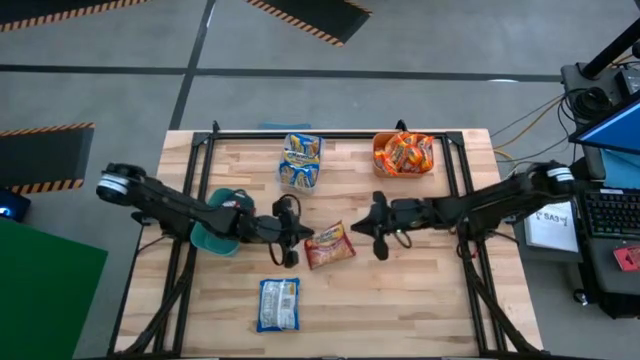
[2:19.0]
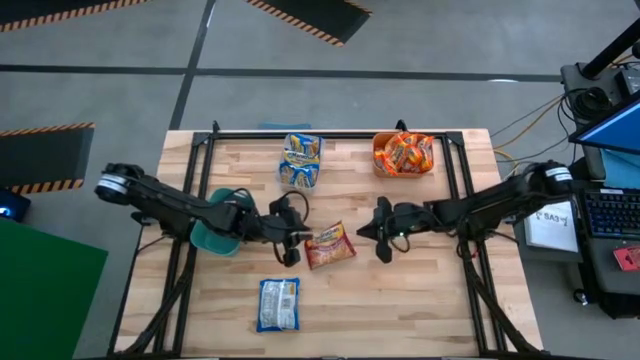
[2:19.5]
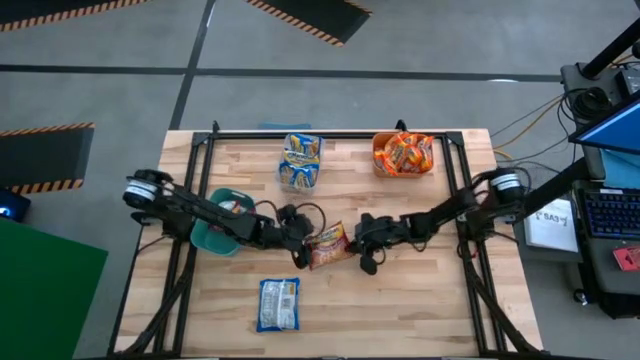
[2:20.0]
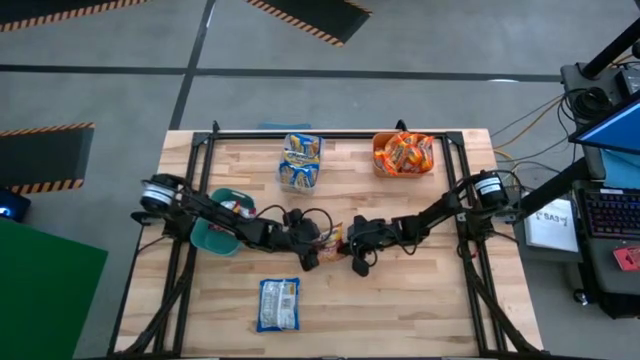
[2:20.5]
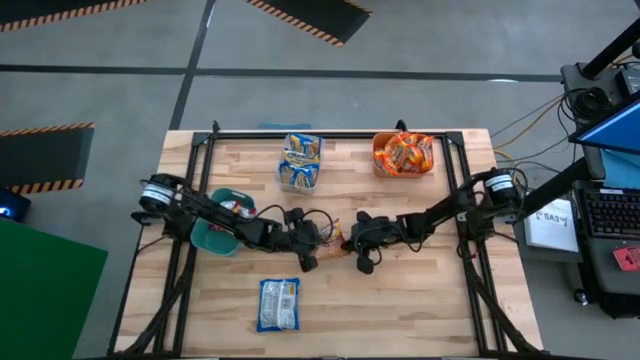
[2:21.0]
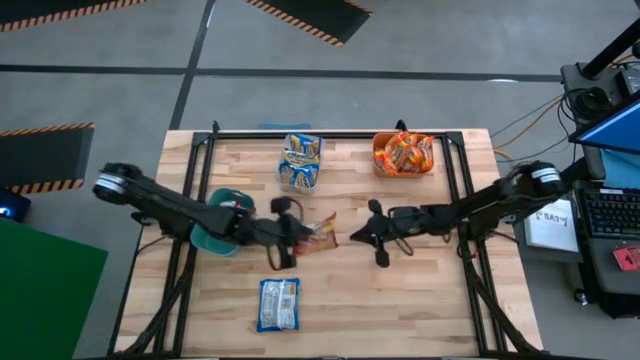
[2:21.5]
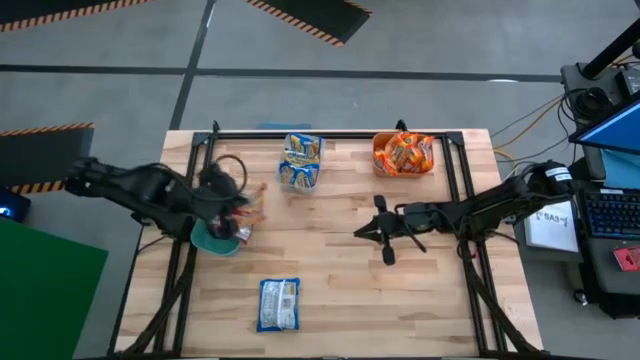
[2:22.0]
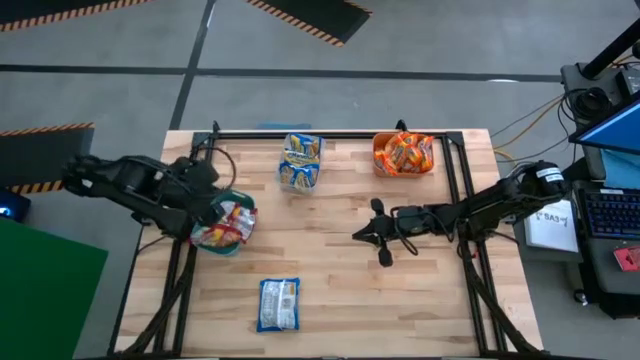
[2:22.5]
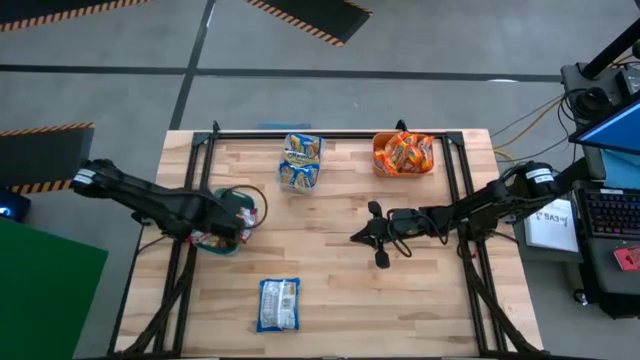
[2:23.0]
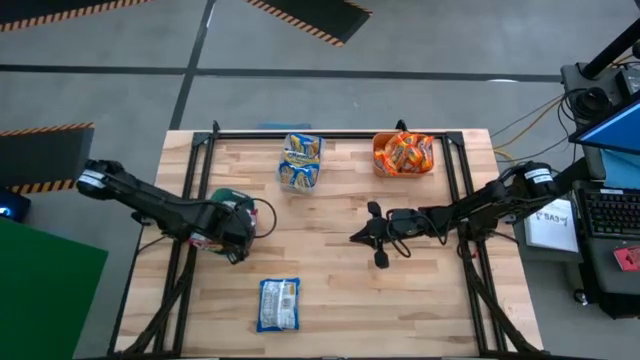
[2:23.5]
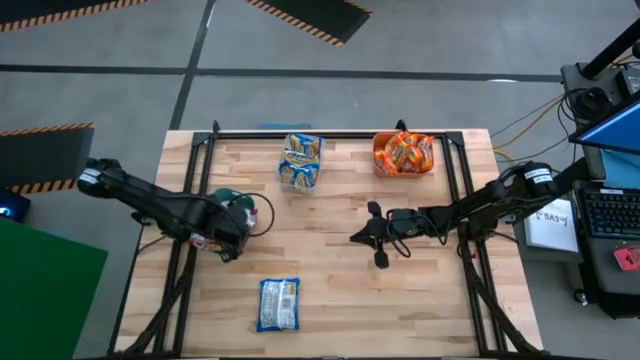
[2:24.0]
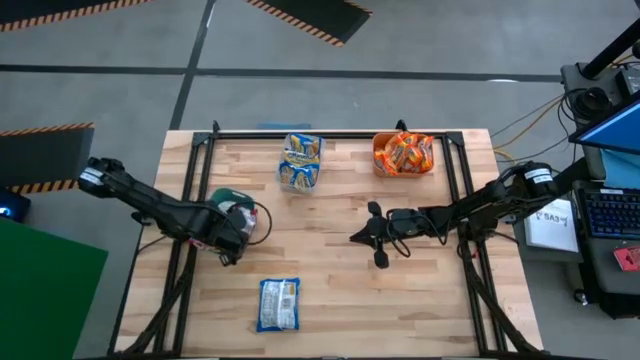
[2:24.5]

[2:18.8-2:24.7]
Task: Sort Maruchan noodles
Put the red noodle pack into the blue bin

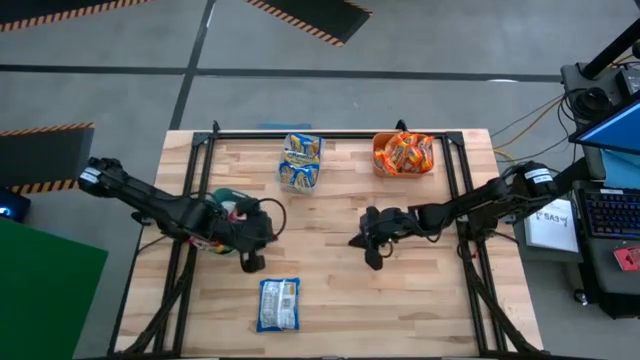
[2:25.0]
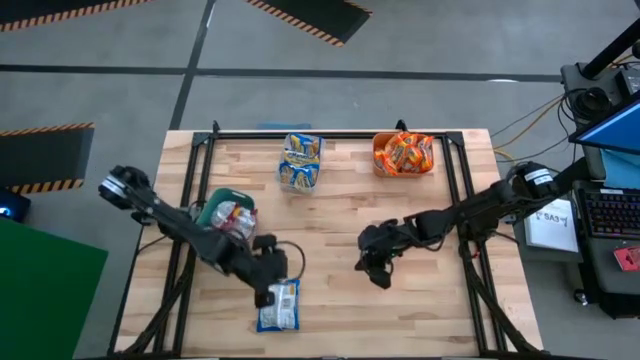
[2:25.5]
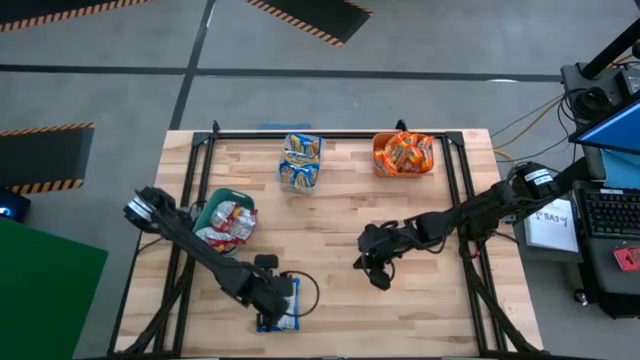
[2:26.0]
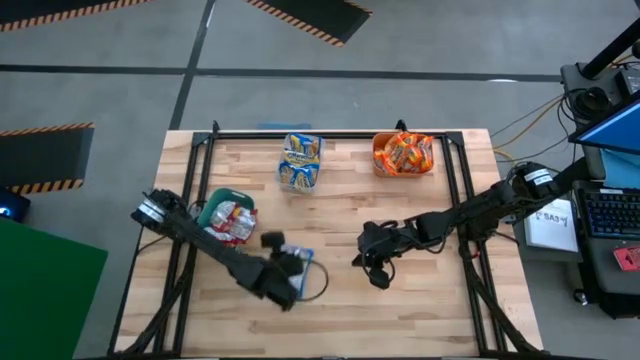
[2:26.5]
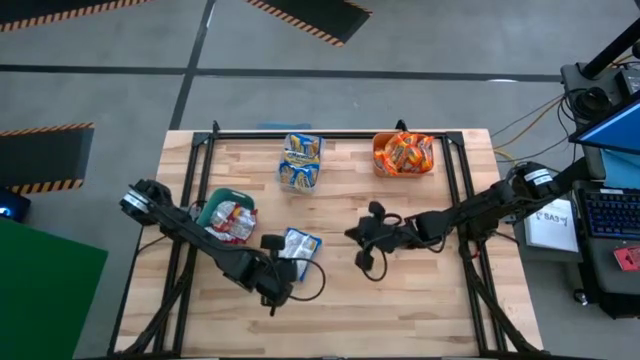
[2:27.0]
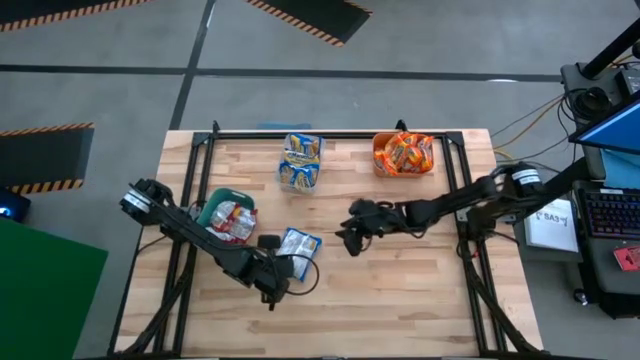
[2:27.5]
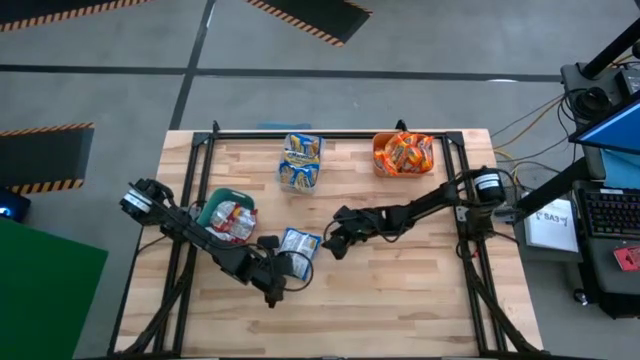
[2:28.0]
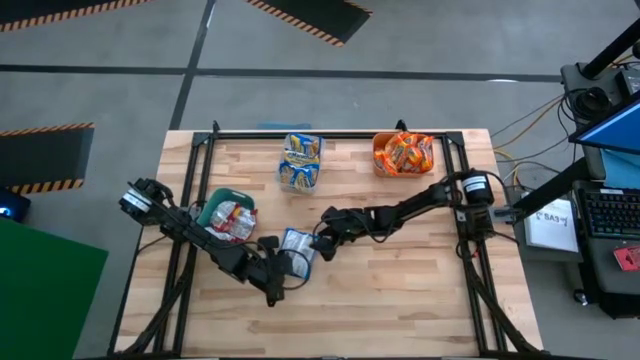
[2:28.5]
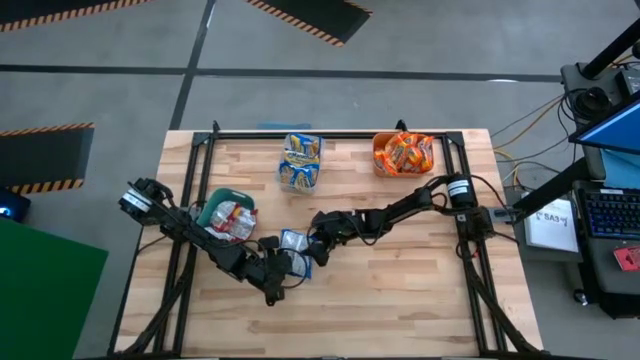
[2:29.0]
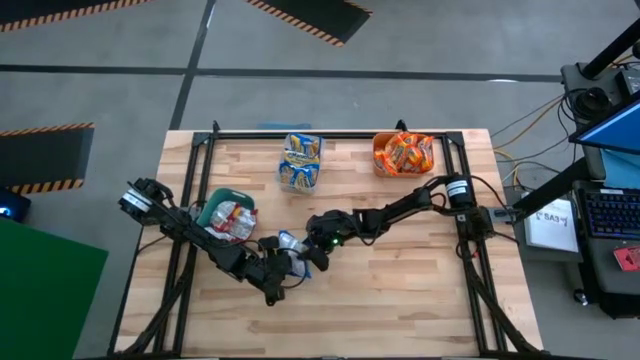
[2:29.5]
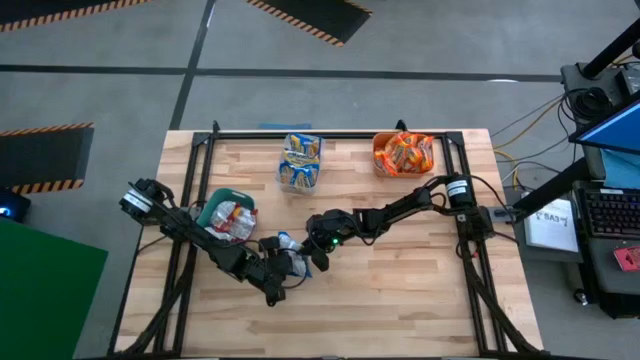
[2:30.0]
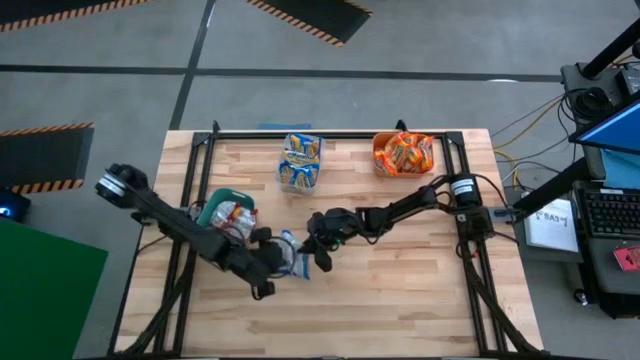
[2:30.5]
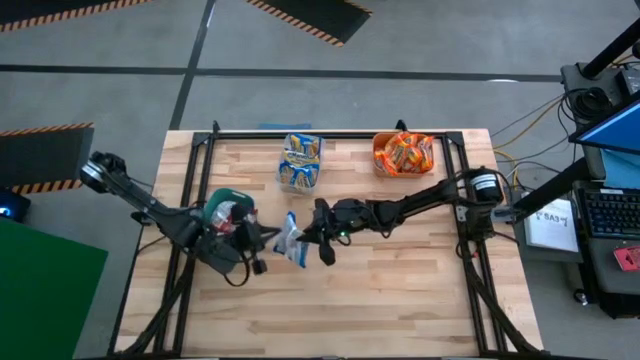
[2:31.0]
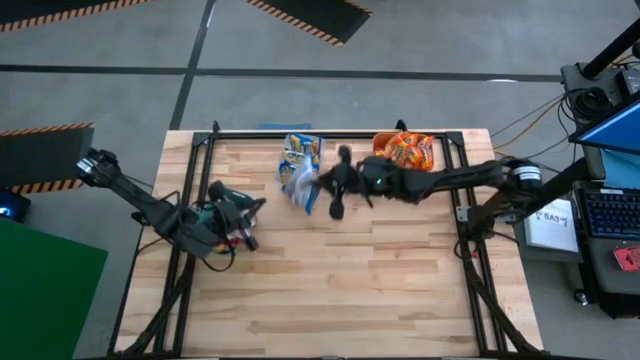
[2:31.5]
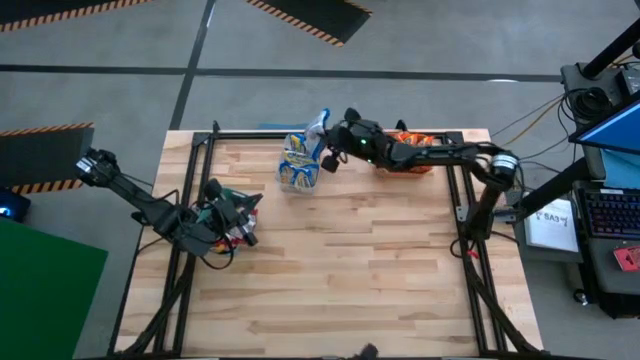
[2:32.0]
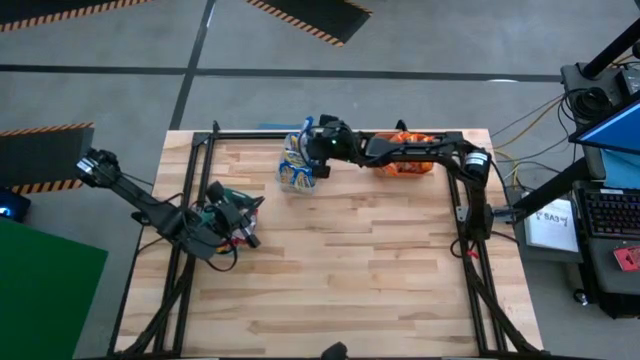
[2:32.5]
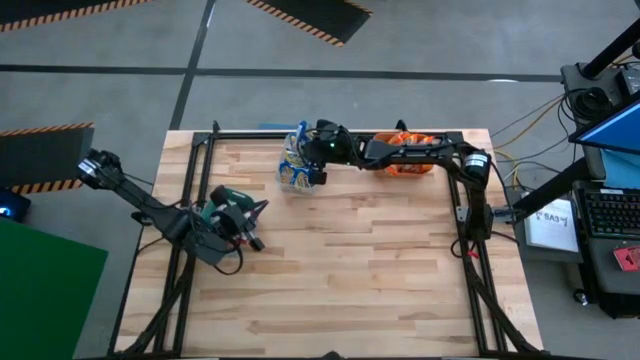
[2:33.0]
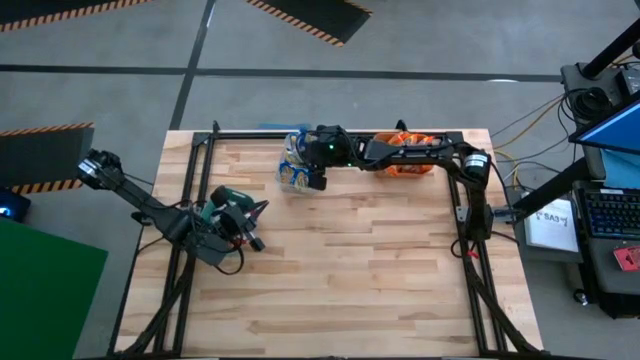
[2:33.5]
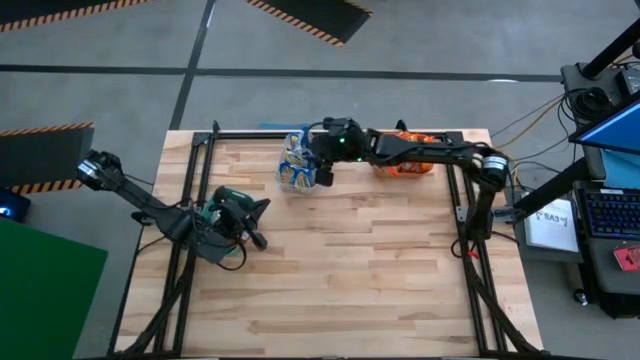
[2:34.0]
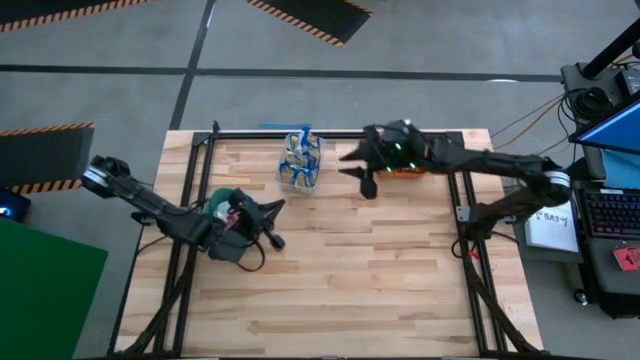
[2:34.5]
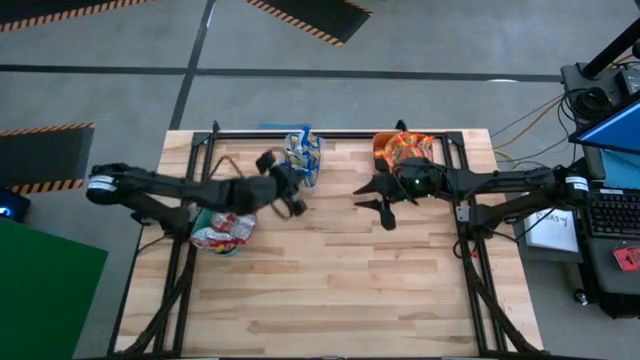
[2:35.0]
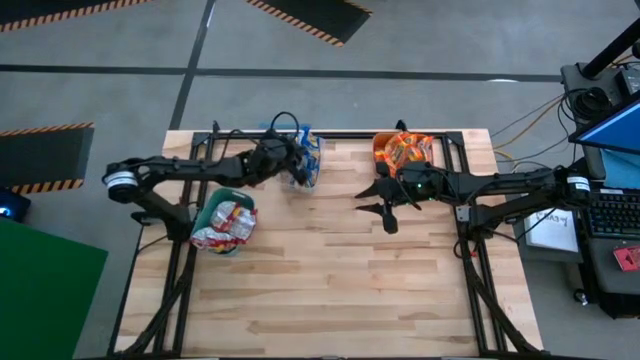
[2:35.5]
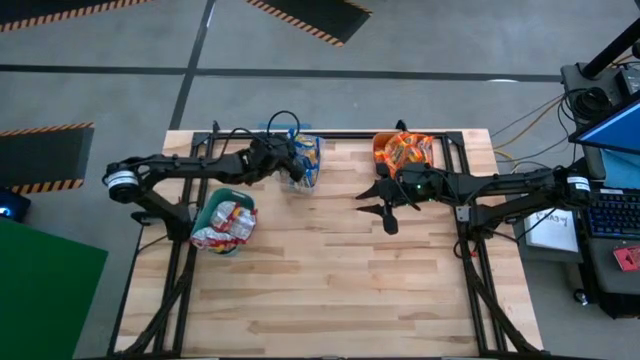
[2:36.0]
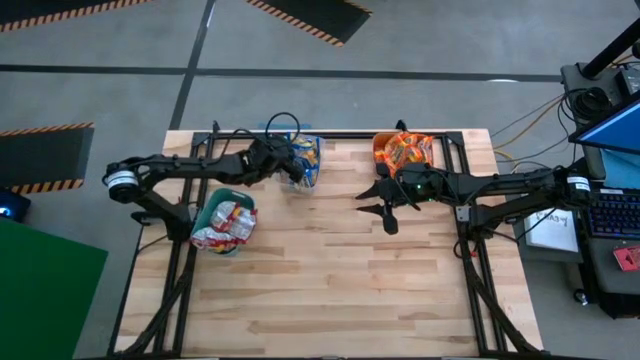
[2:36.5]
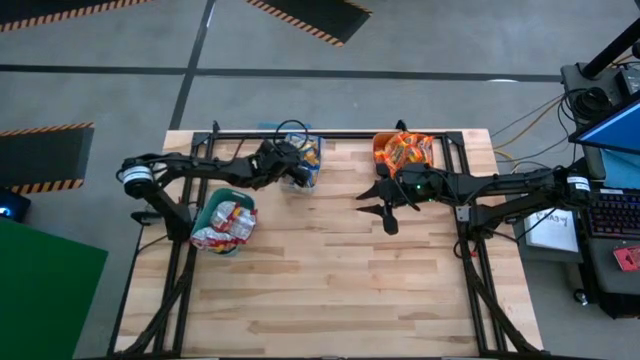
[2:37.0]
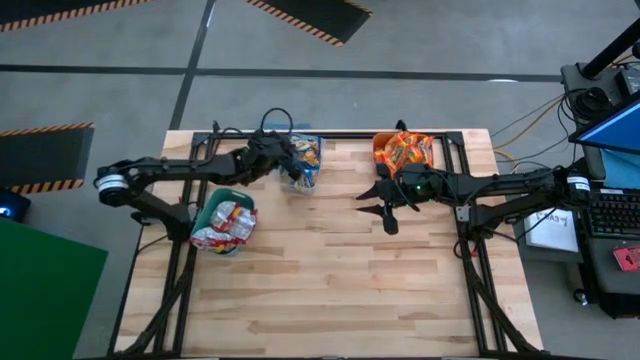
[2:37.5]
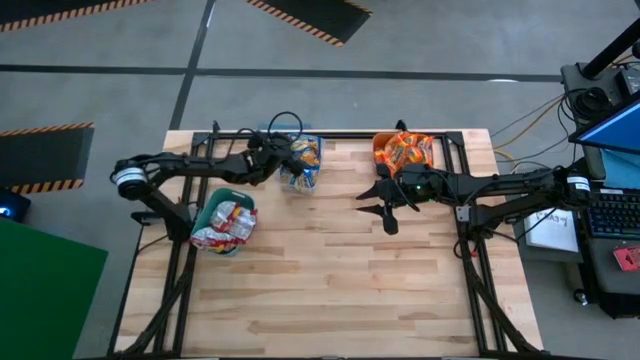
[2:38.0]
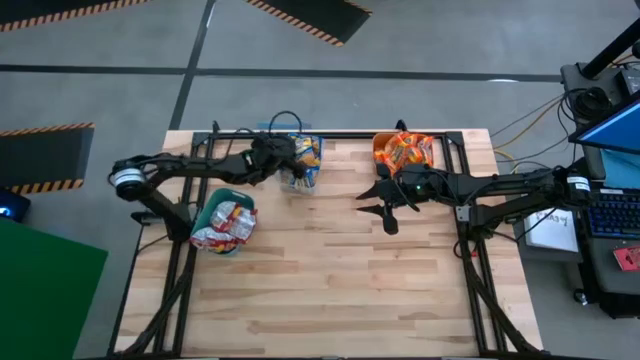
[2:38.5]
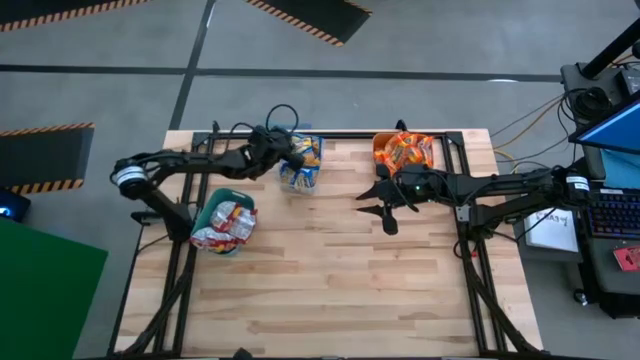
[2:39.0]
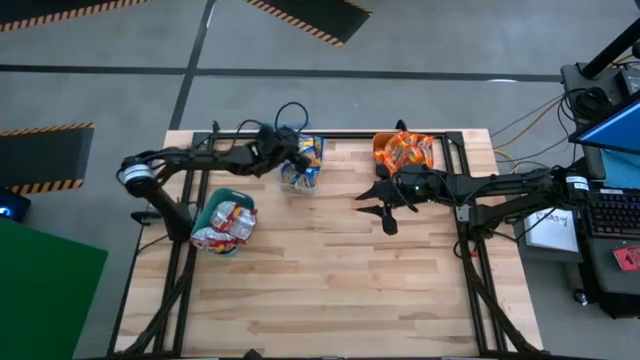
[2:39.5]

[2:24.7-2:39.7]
Put the blue noodle pack in the transparent bin

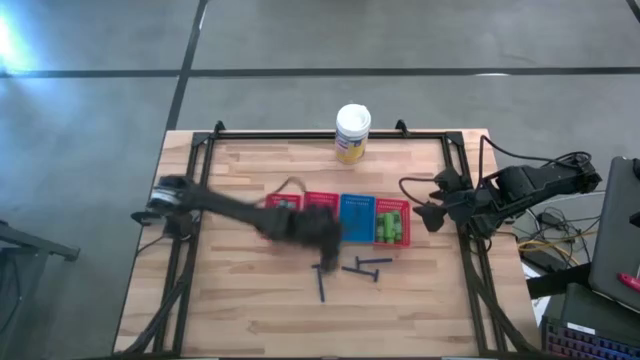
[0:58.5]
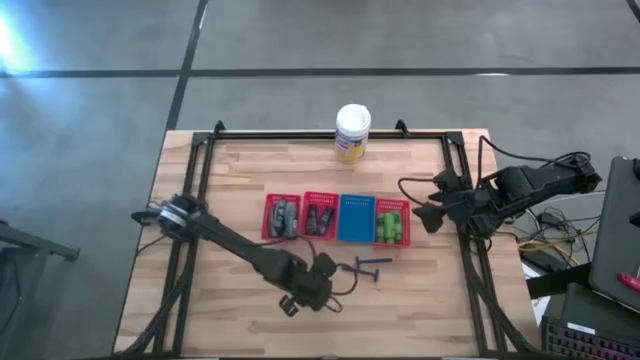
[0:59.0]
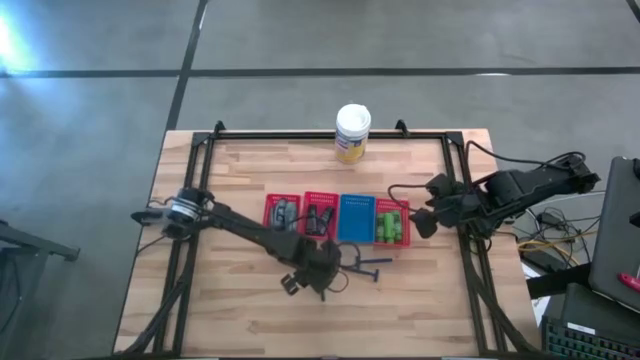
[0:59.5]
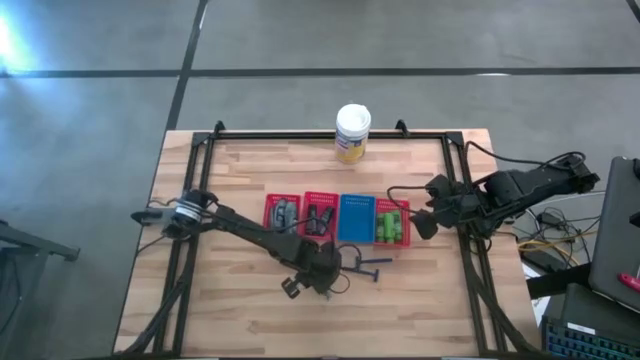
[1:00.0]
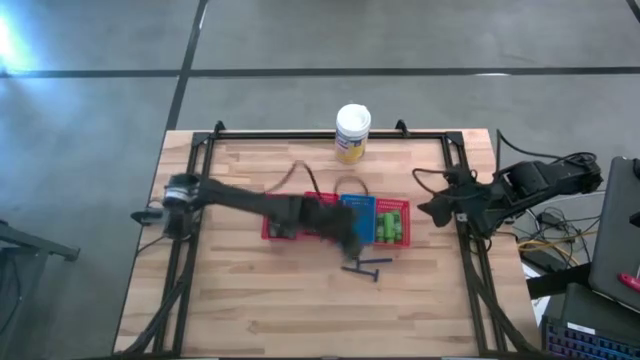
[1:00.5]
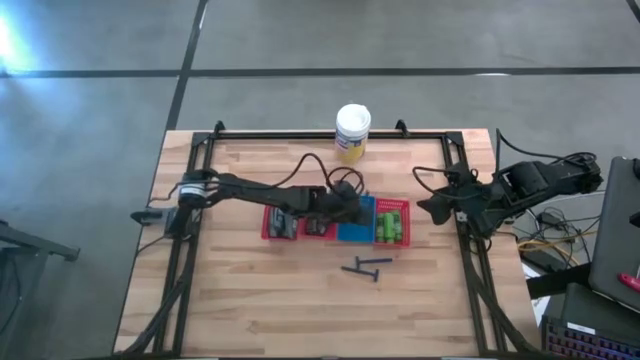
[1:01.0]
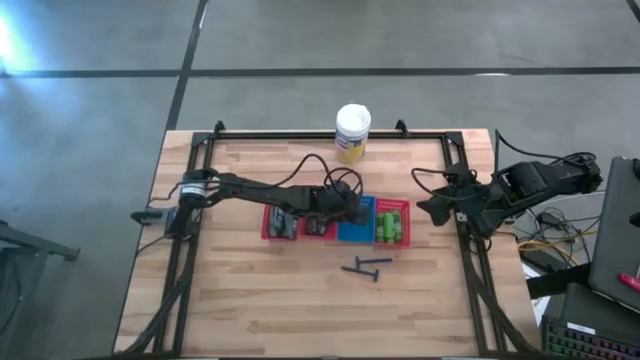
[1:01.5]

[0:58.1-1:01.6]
Task: Pick & Place Travel size toiletries
Put the blue razor into the blue bin
